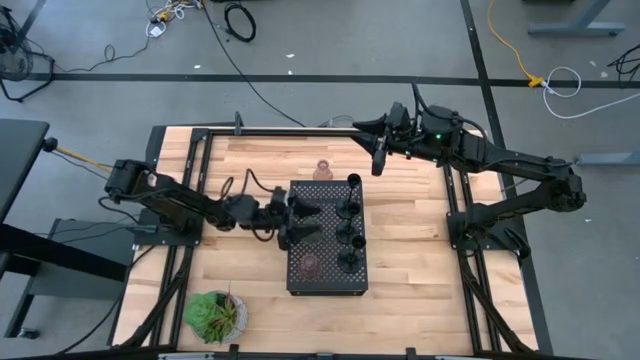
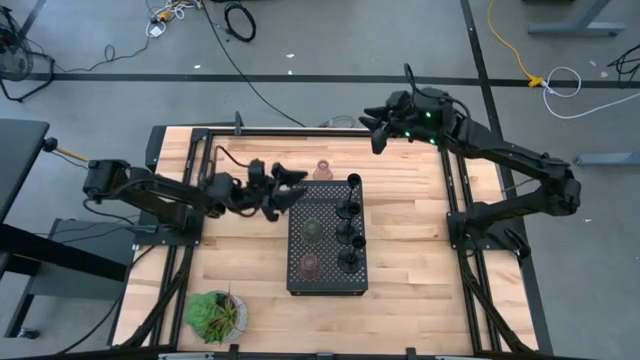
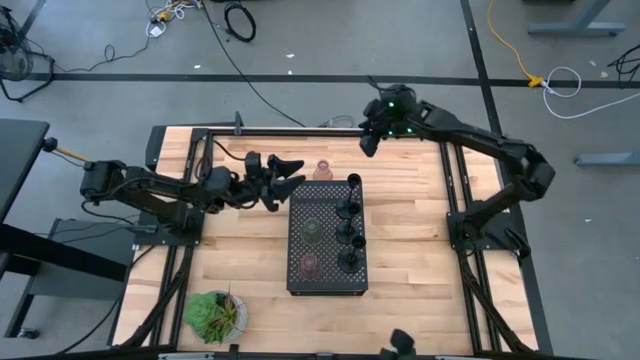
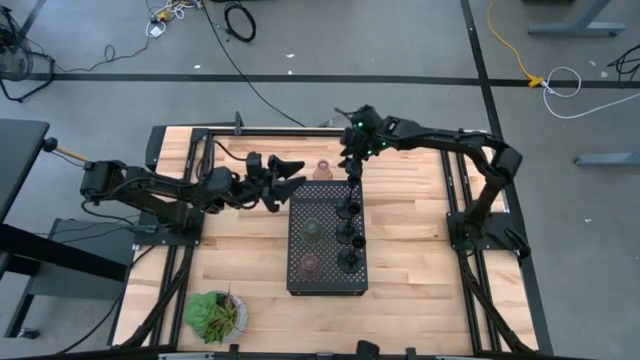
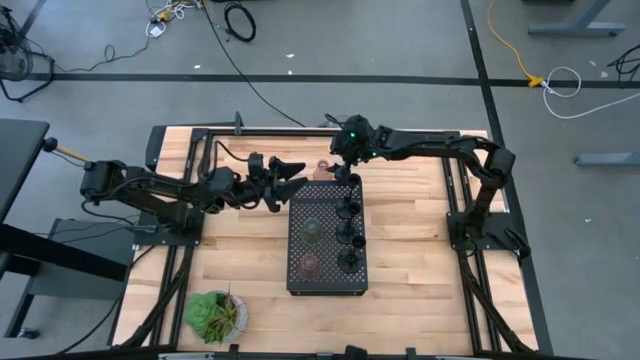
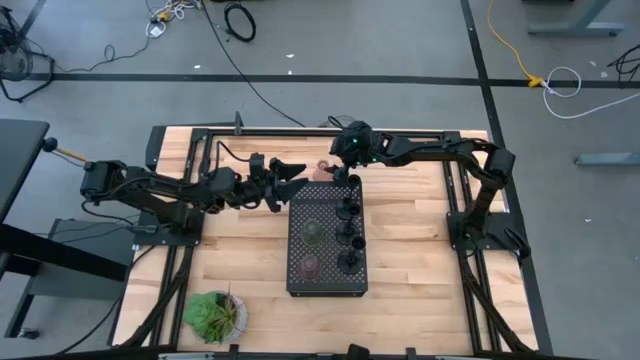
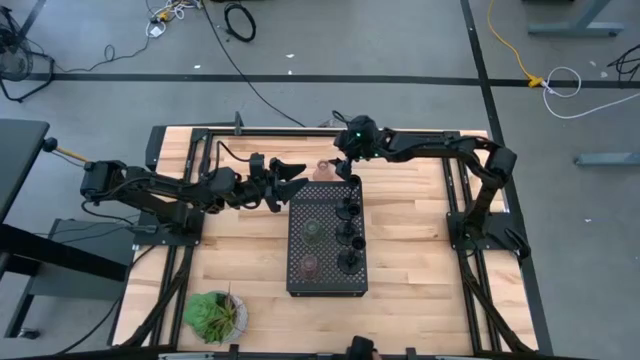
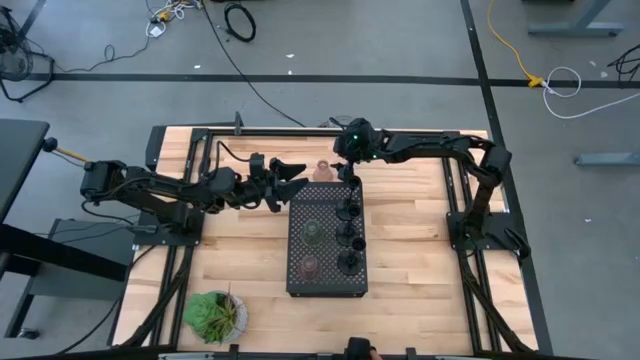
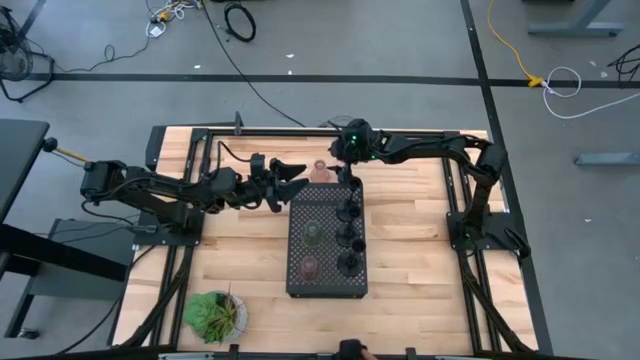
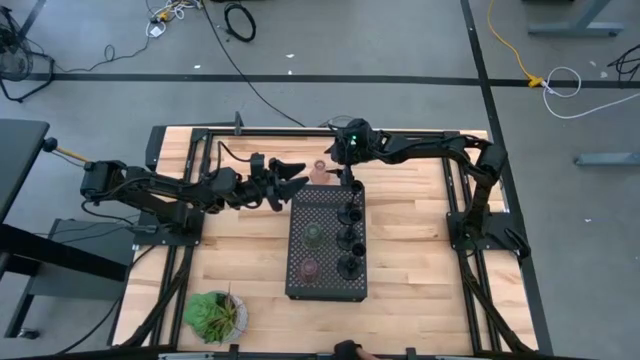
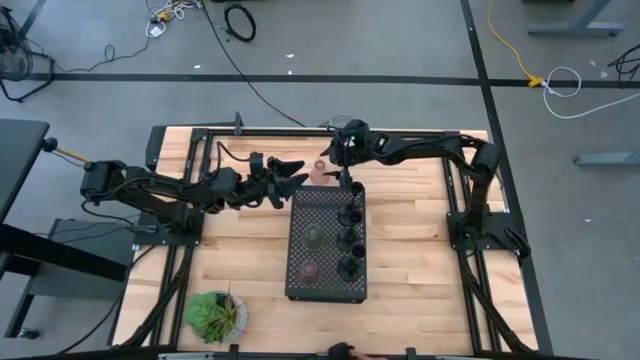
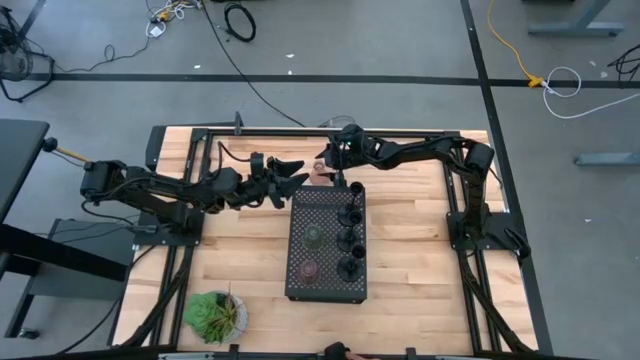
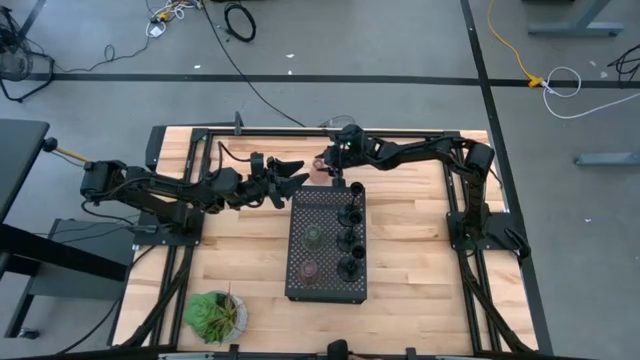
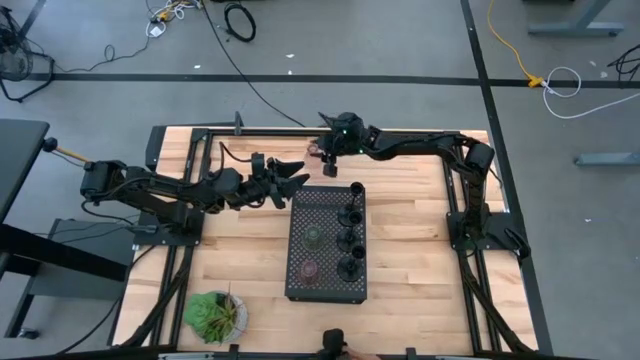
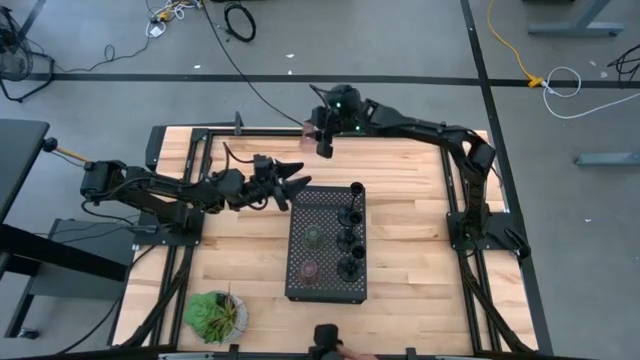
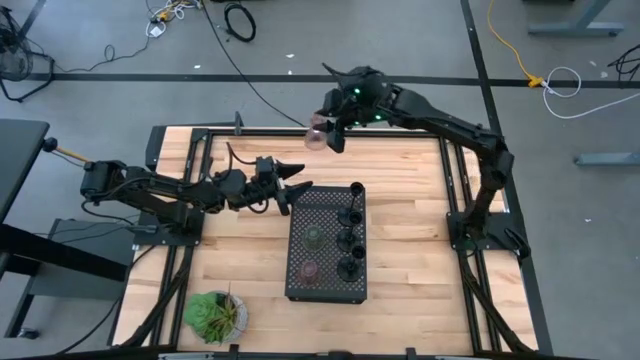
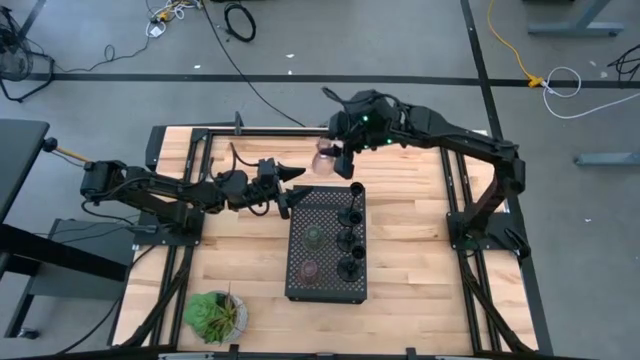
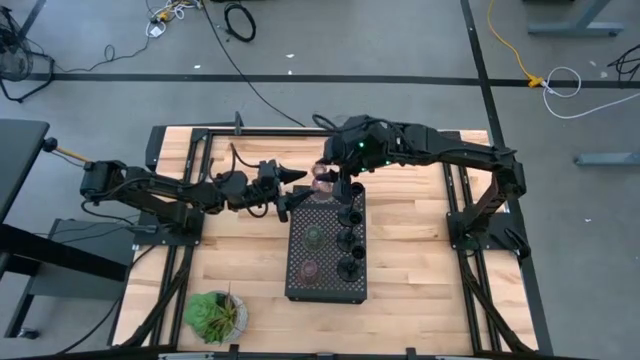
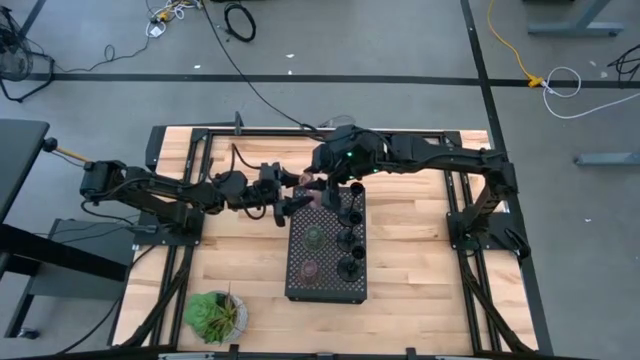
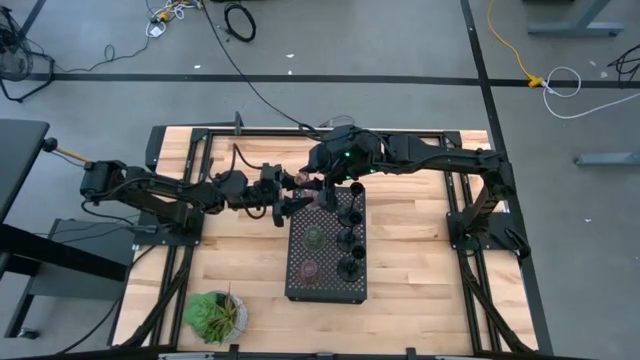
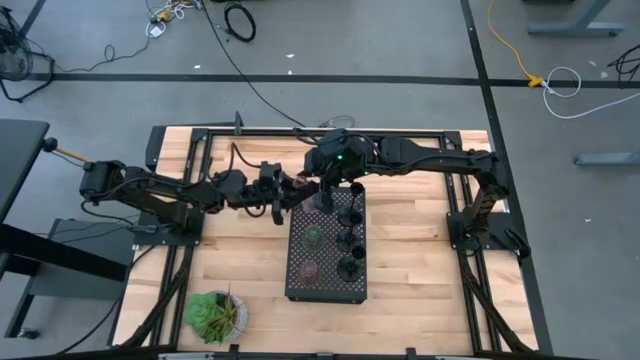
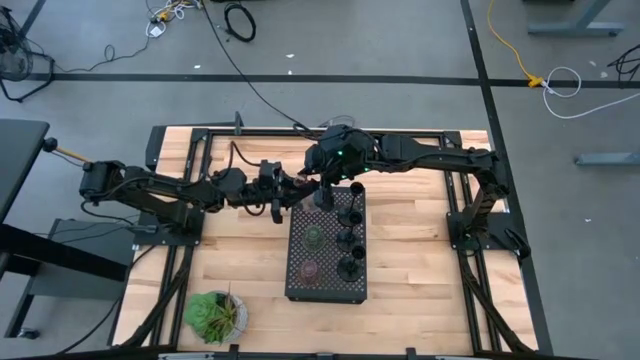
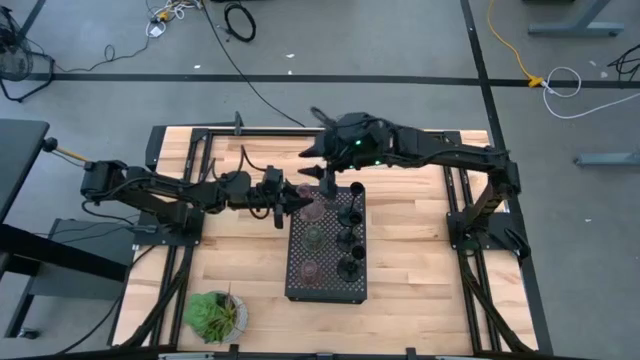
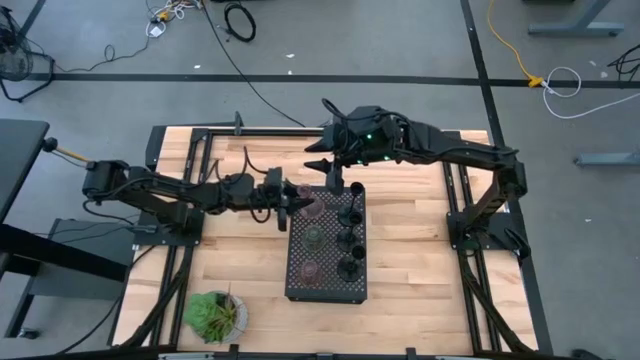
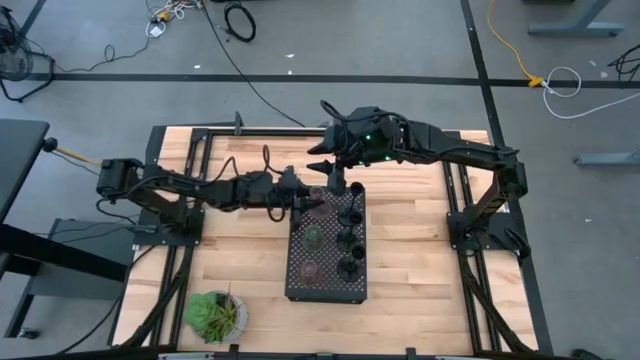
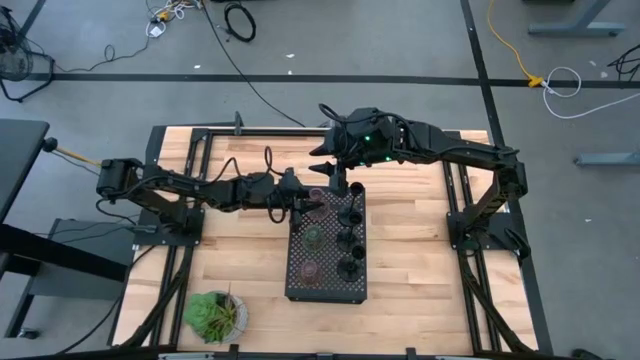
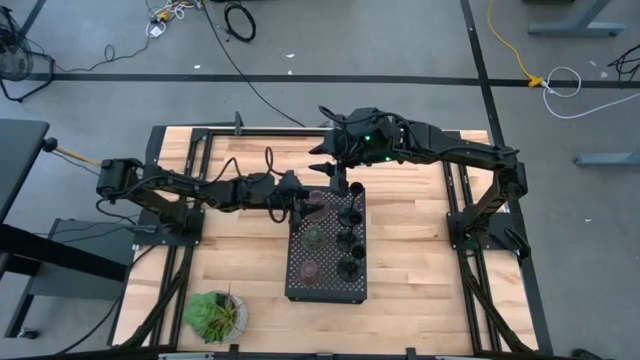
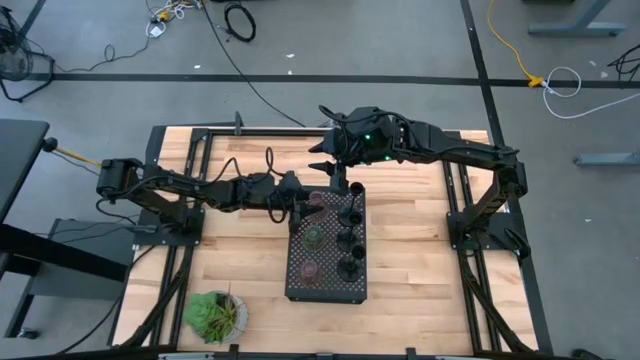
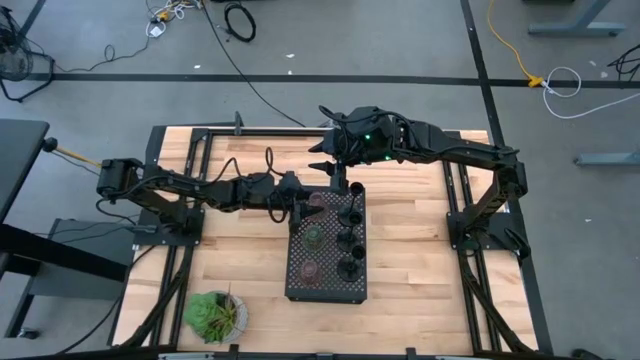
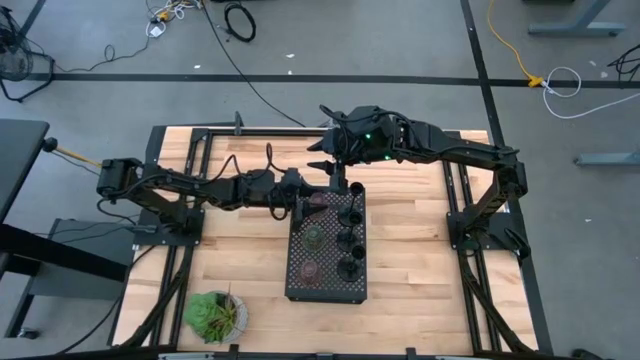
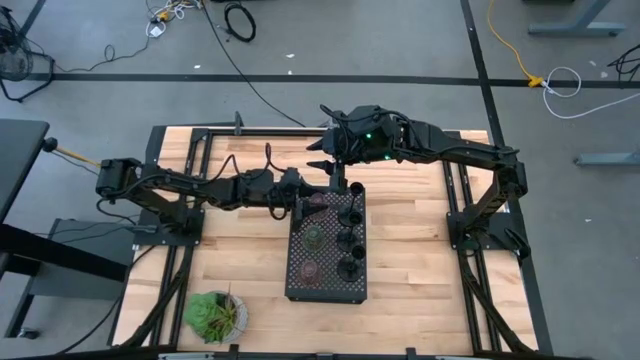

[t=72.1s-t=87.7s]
Task: Pick & Place candle stick holders
Put the pink glass candle holder on the shelf

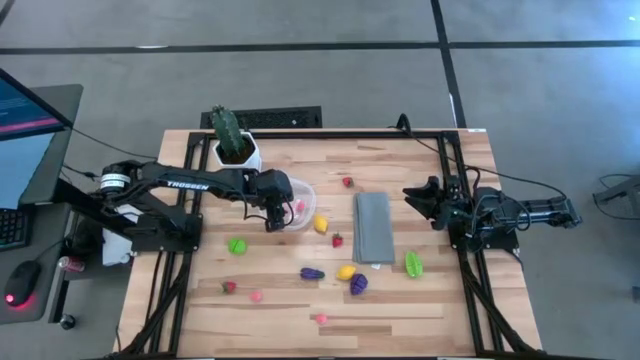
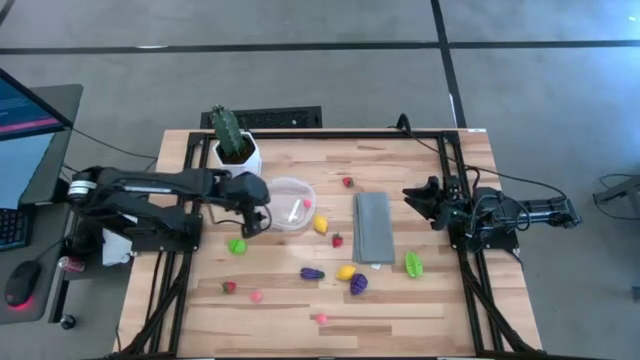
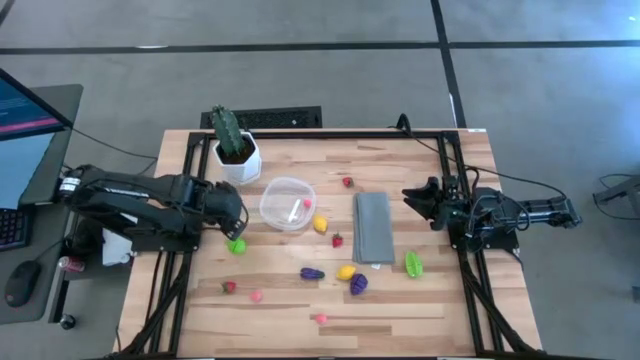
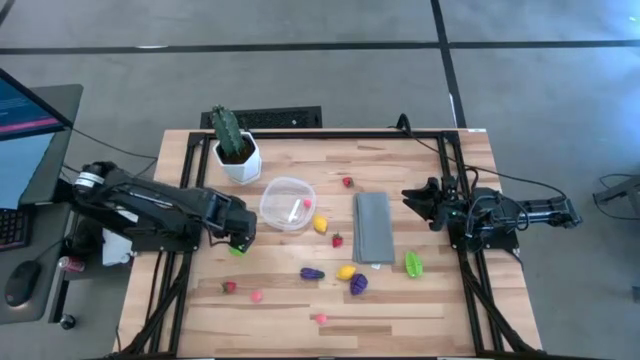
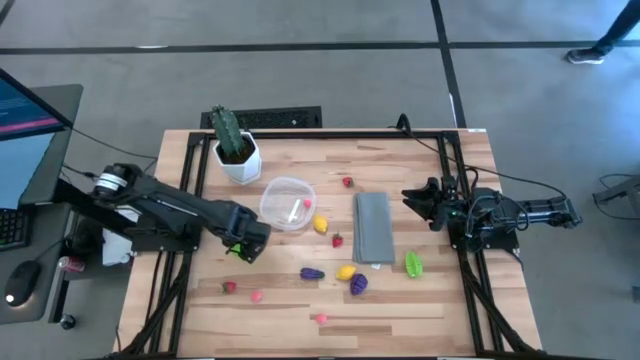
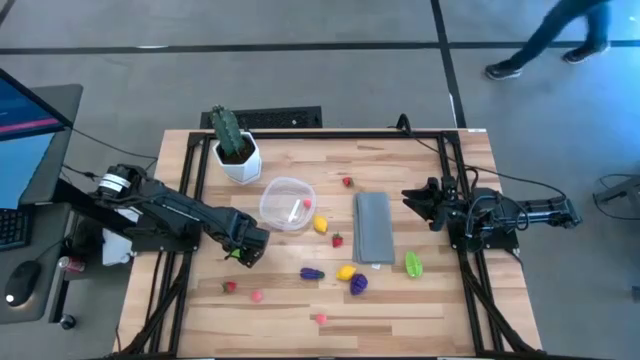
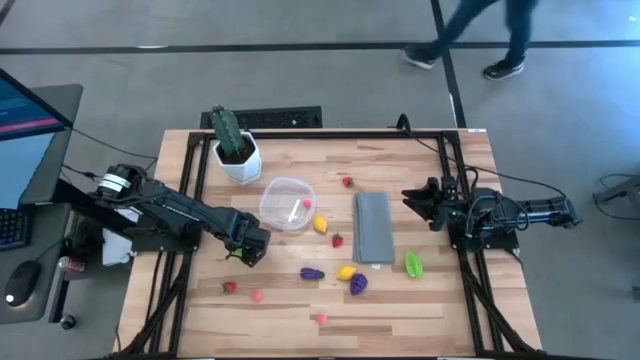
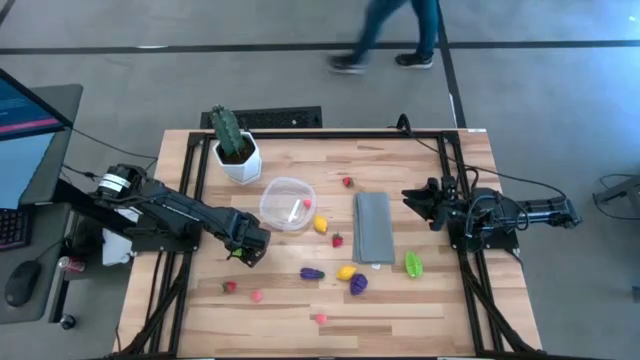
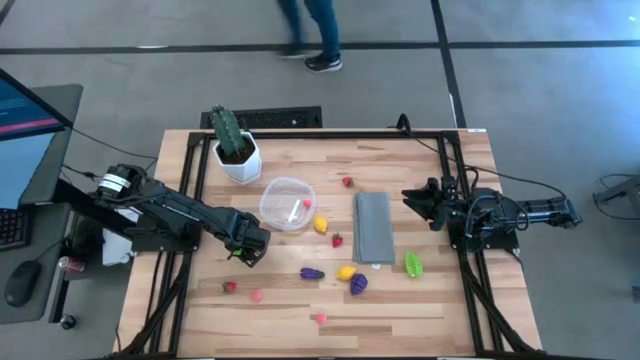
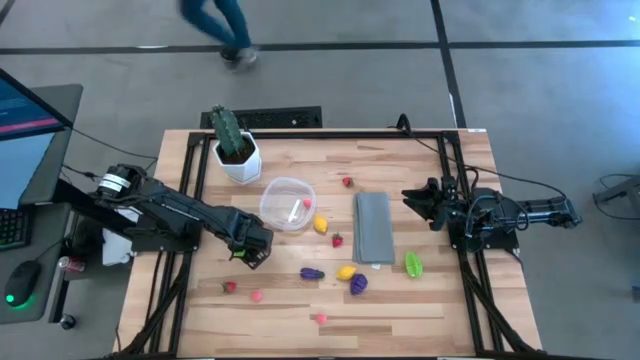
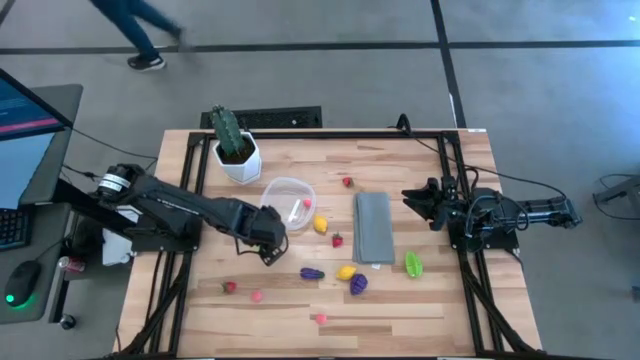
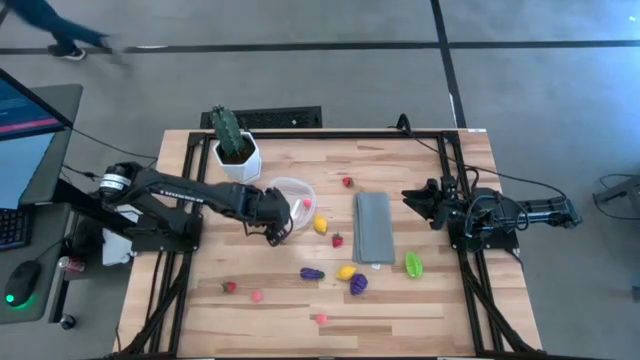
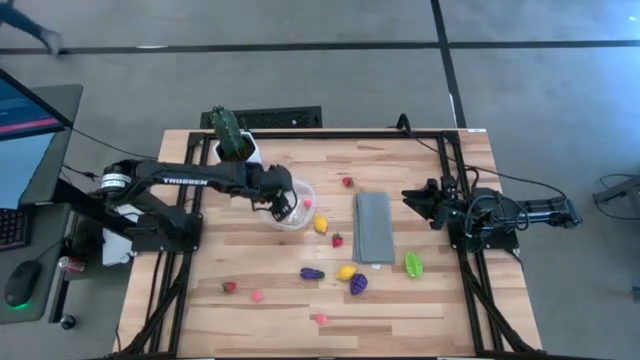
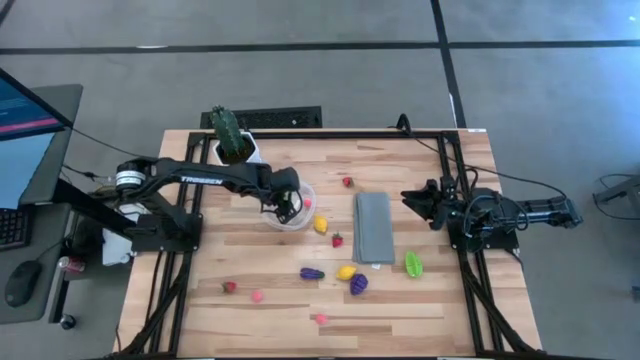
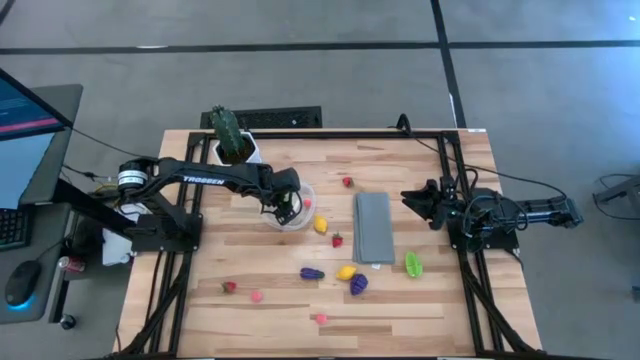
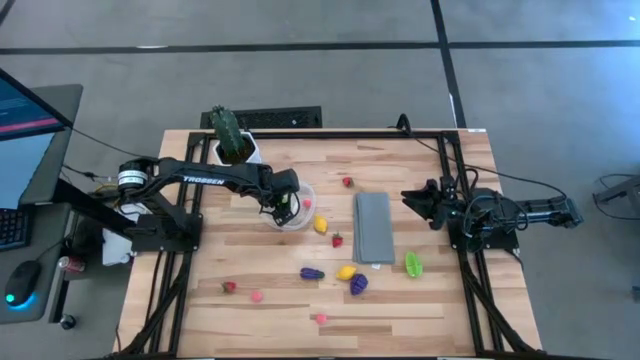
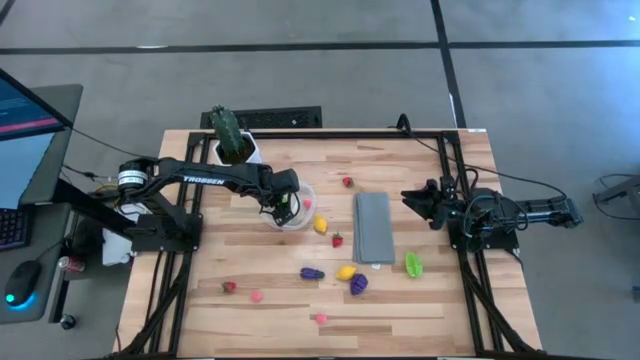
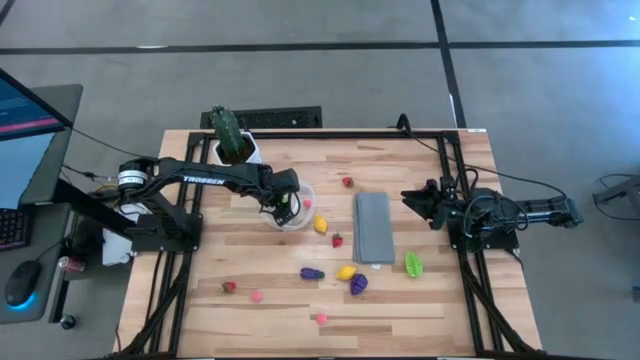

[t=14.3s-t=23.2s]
Task: Pick and placing Produce into tupperware
Put the green cabbage into the transparent container
